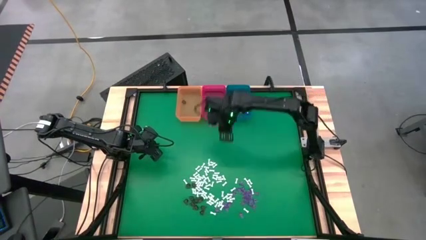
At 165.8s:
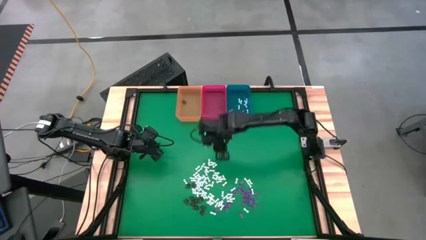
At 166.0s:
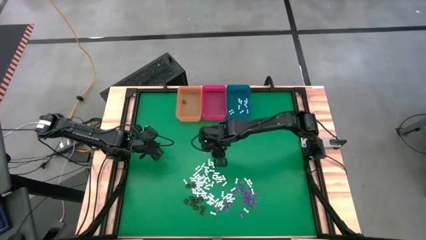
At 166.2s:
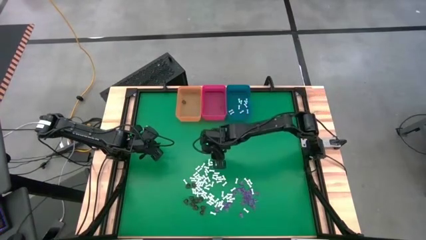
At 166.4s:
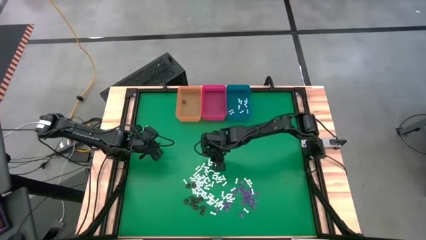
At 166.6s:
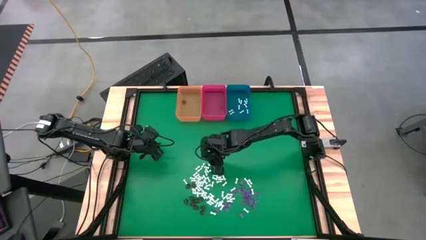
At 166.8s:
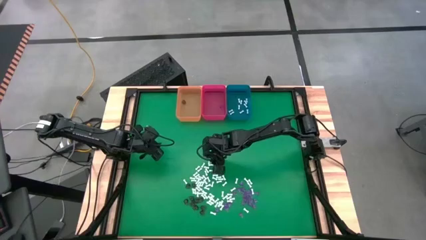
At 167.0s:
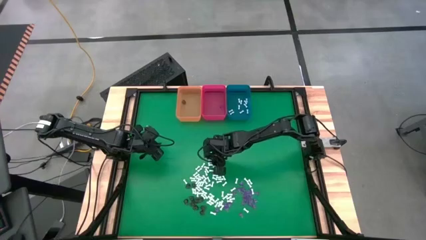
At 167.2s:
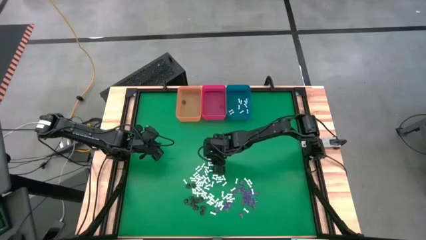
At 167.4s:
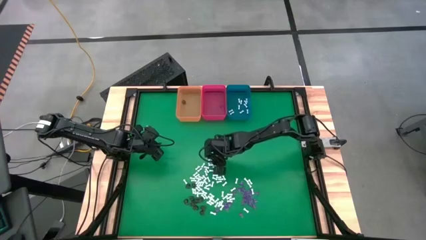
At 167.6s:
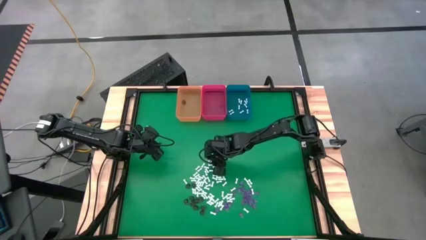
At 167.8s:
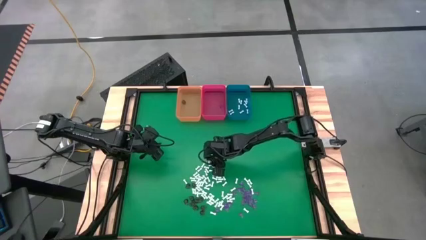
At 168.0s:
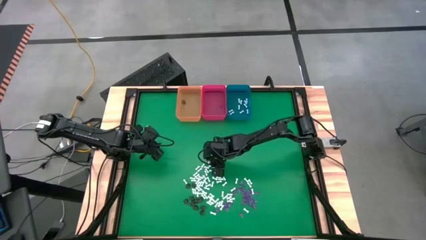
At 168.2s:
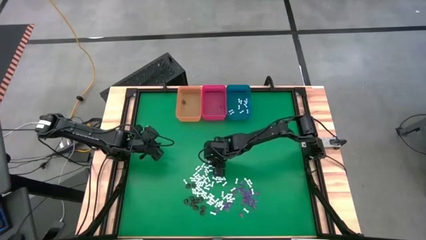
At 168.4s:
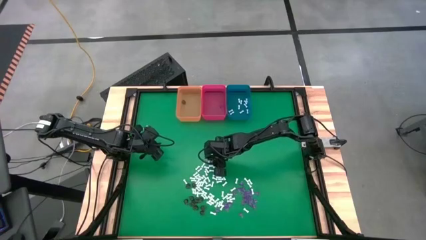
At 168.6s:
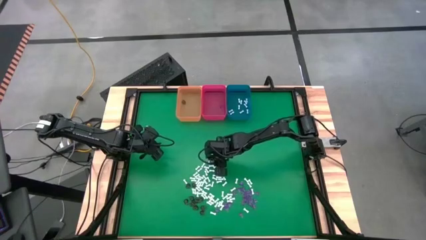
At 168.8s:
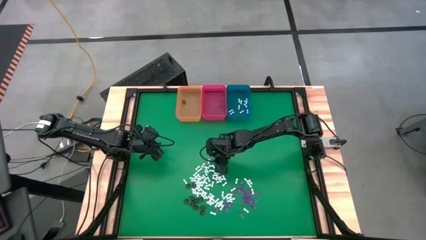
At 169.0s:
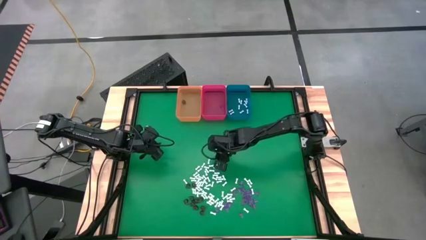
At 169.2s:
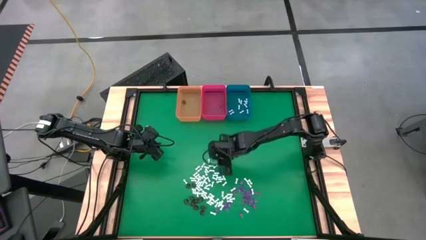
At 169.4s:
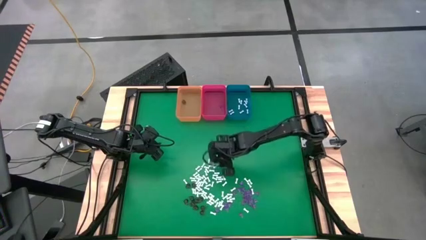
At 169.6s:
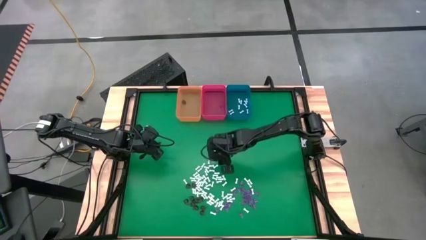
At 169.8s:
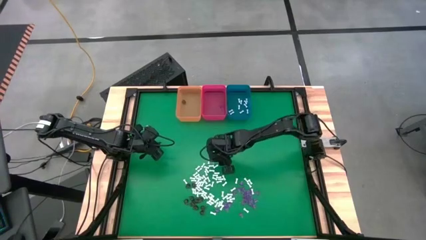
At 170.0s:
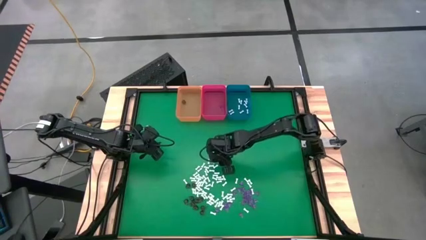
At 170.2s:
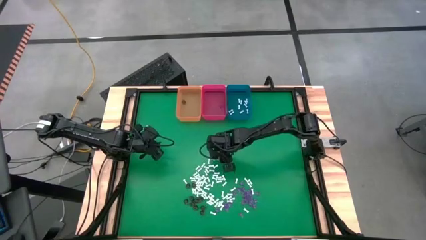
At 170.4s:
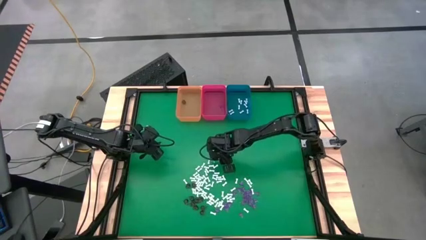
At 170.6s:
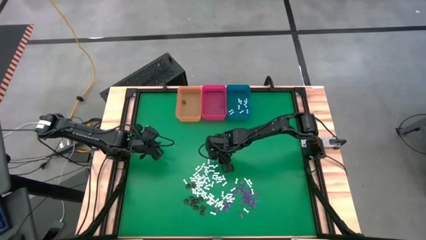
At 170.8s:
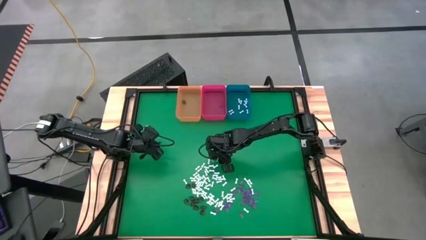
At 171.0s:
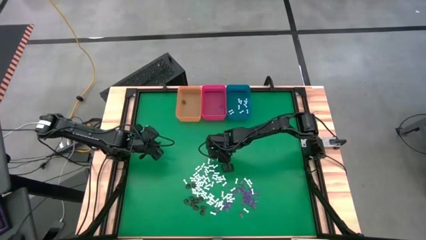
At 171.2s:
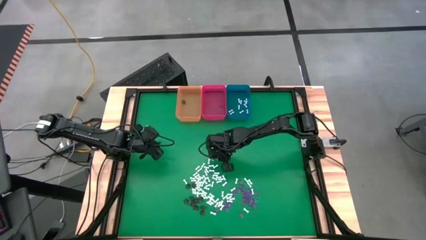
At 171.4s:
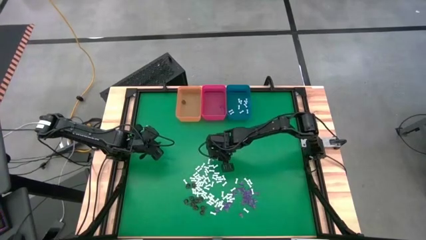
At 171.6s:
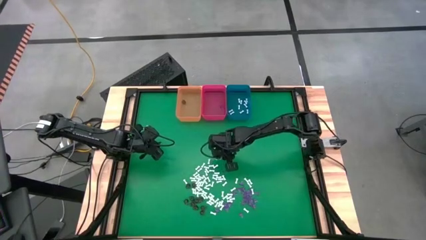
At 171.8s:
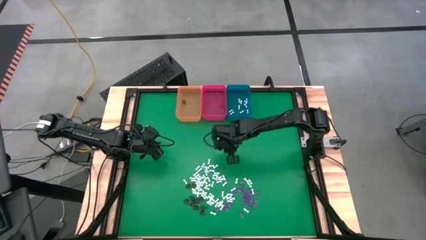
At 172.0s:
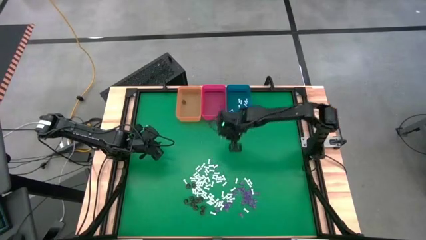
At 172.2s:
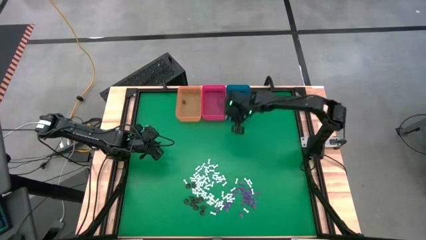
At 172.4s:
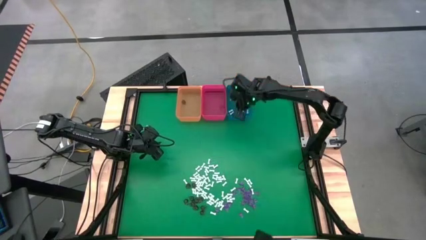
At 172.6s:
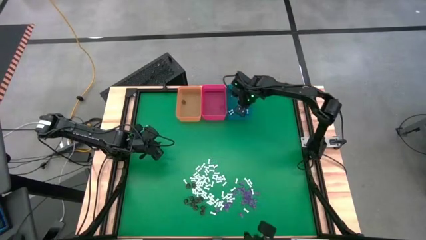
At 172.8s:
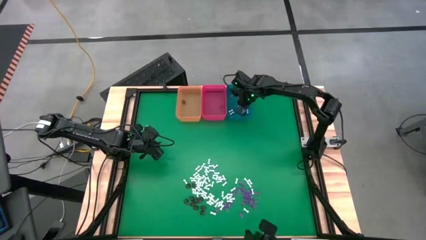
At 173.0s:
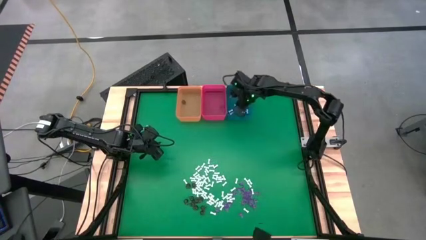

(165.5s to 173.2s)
Task: Sort Halloween decoration
Put the white bone toy into the blue bin

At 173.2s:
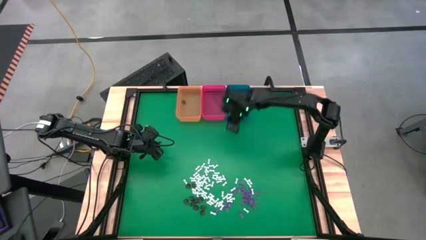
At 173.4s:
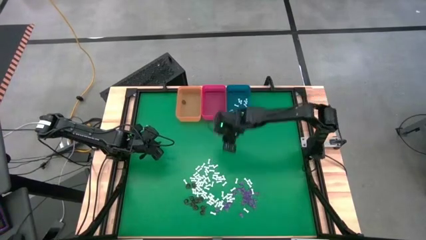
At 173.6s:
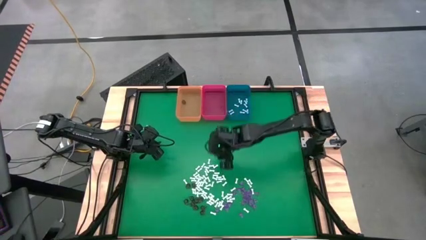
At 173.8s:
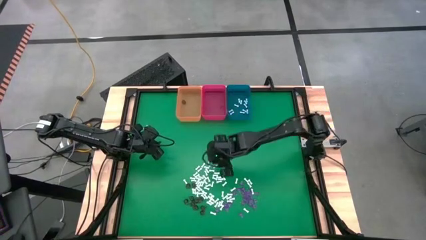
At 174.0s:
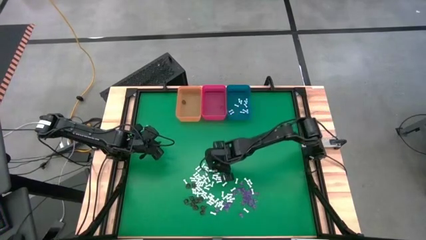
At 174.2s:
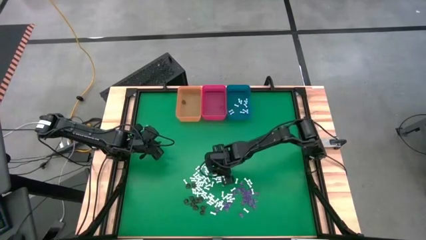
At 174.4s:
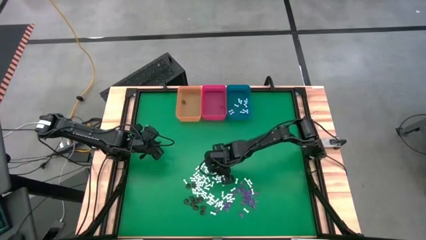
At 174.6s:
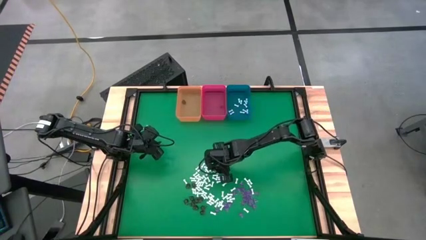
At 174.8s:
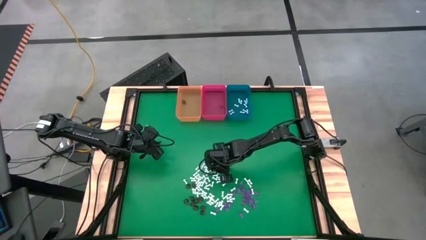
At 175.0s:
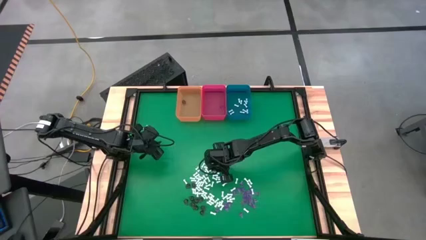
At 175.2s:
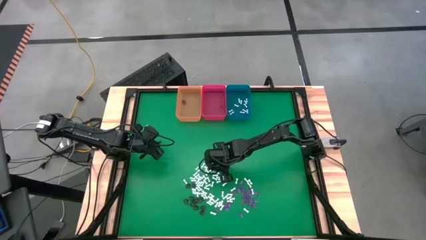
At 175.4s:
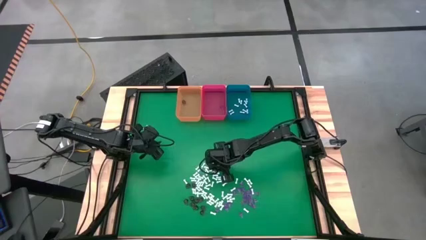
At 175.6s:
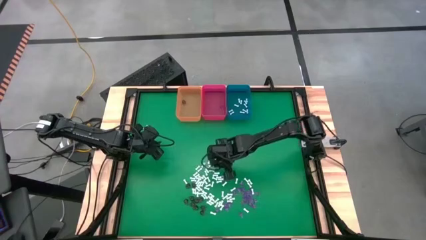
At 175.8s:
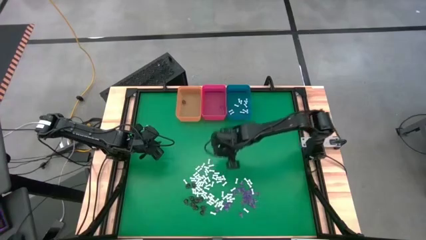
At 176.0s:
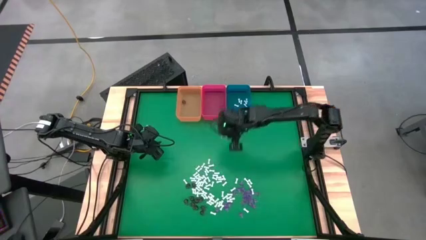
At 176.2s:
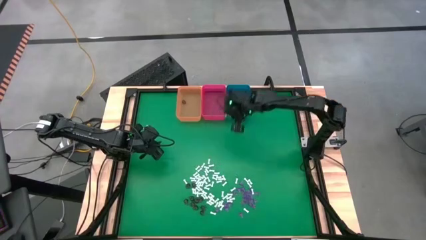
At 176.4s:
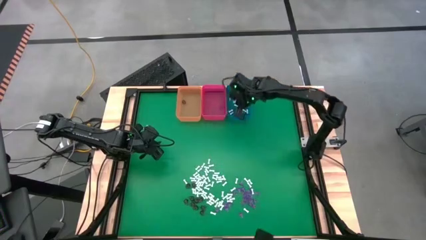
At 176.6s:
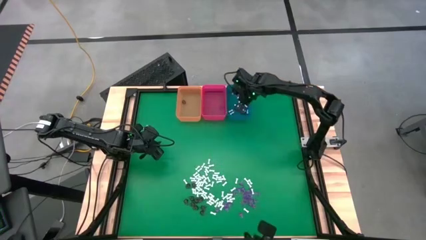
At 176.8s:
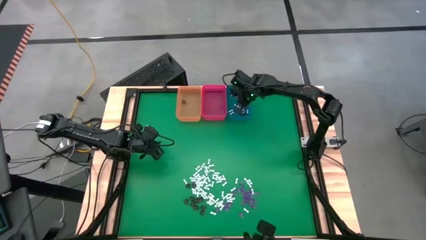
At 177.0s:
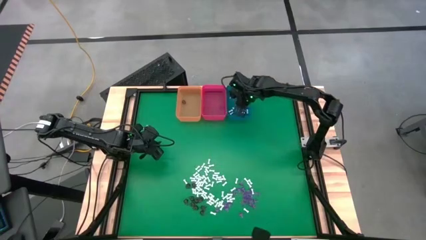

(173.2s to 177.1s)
Put the white bone toy into the blue bin

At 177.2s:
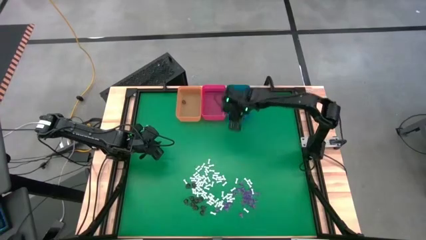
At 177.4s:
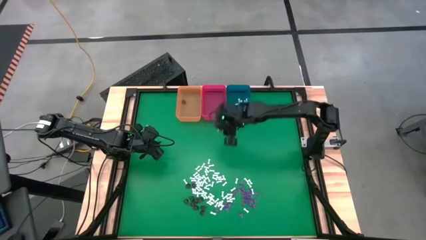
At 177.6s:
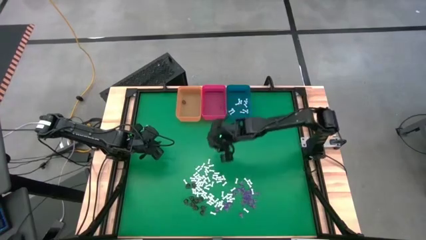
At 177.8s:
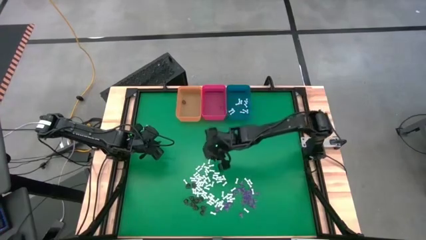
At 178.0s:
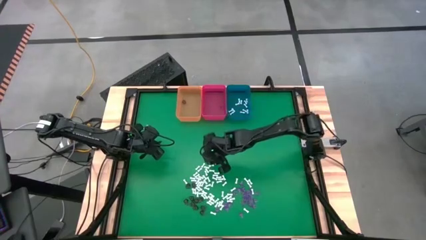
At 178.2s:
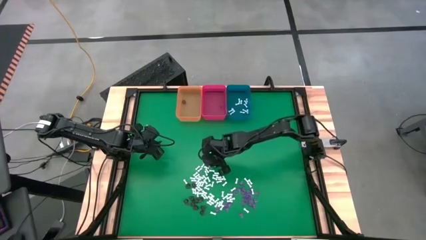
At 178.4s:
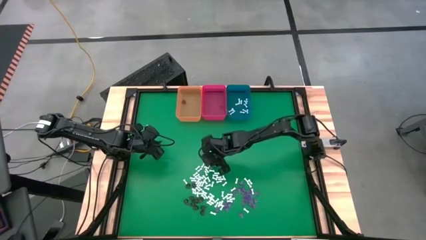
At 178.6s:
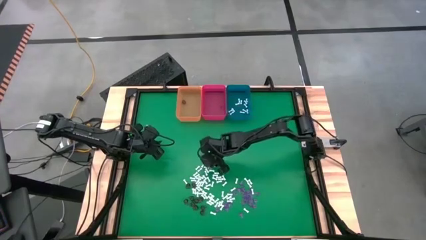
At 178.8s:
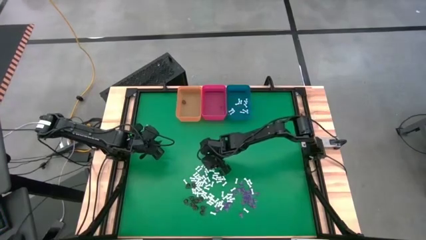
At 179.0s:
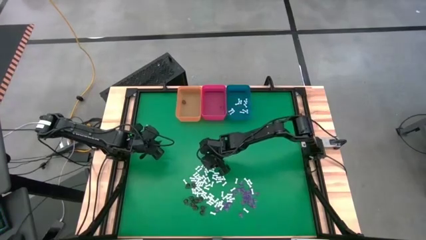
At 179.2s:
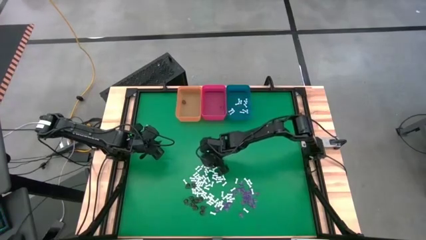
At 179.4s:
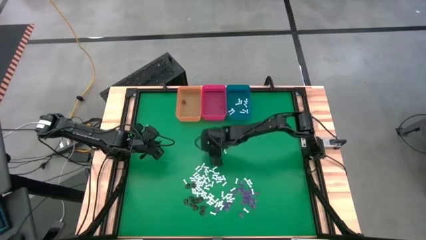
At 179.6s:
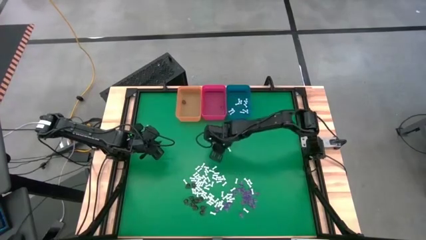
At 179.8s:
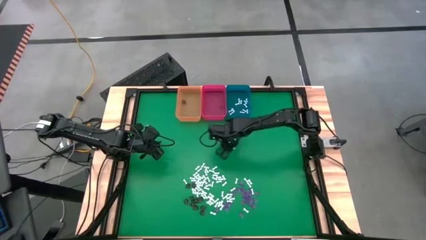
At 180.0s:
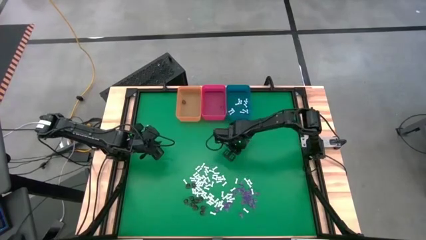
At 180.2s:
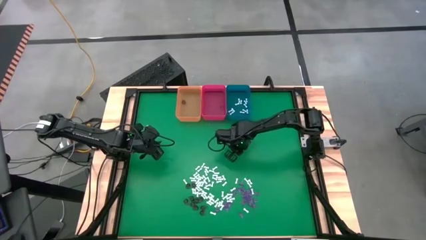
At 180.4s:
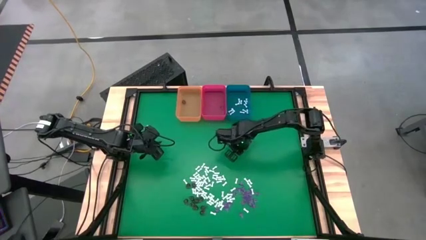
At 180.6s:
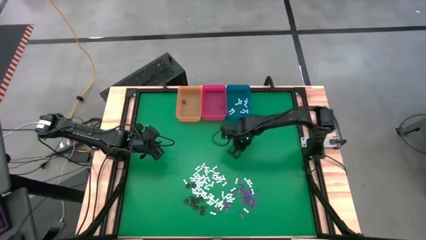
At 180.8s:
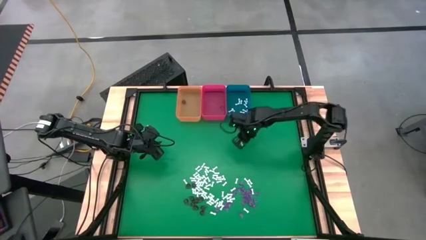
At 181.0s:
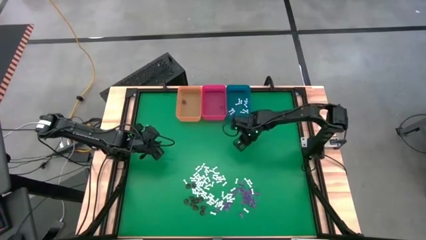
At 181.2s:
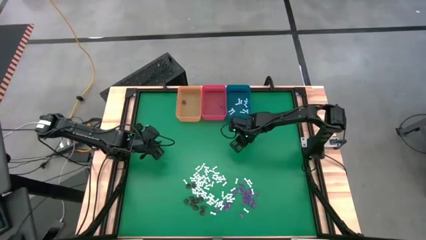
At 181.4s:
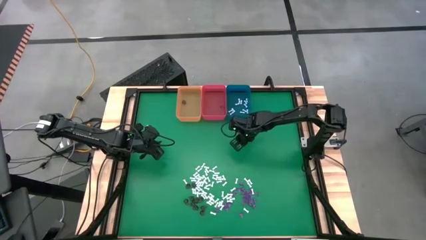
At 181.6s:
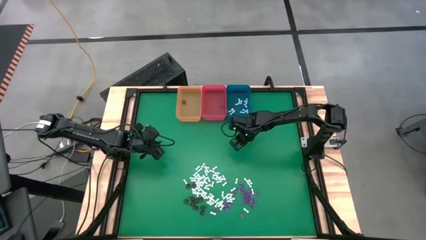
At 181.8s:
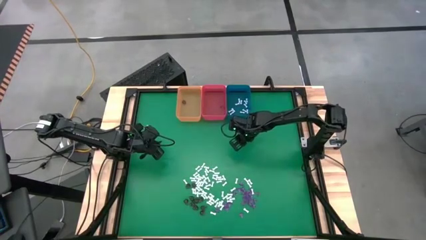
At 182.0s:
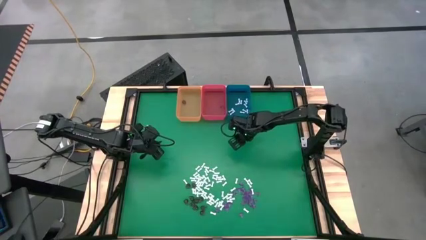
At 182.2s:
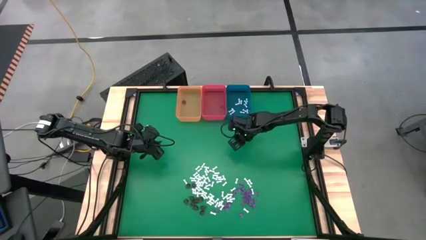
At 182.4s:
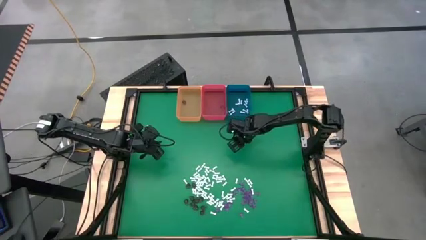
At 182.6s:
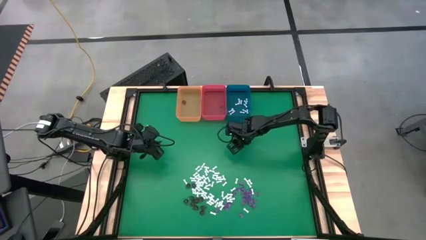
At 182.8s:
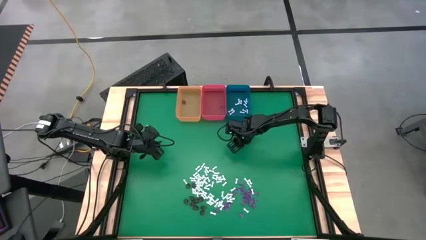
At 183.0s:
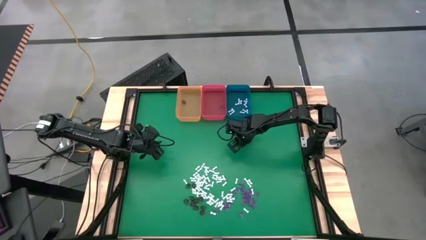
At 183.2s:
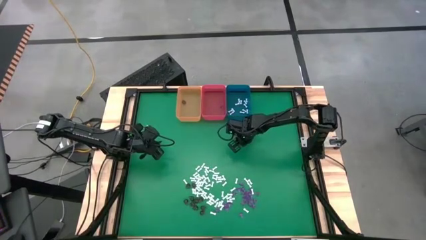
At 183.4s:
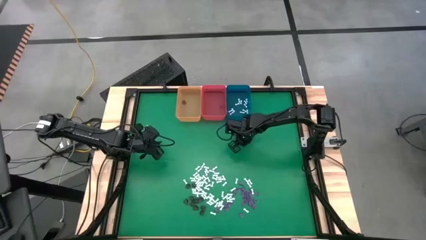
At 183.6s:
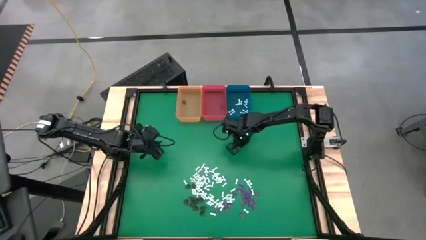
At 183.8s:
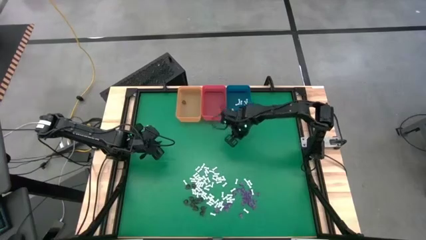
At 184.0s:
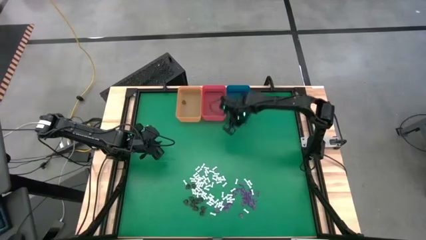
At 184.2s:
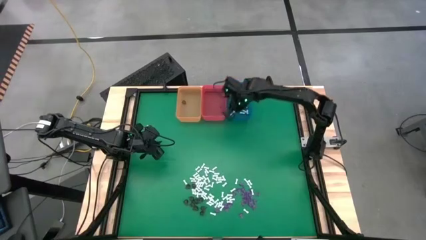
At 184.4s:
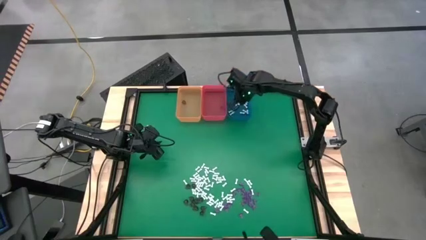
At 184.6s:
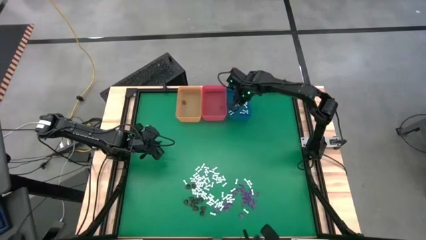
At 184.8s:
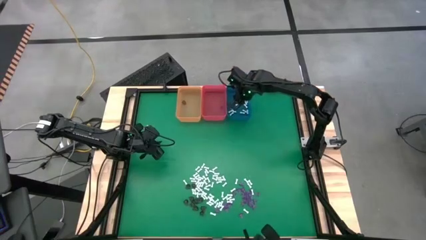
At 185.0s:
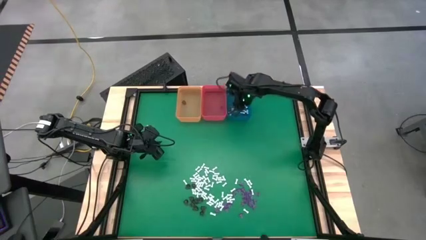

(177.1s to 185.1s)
Put the white bone toy into the blue bin
